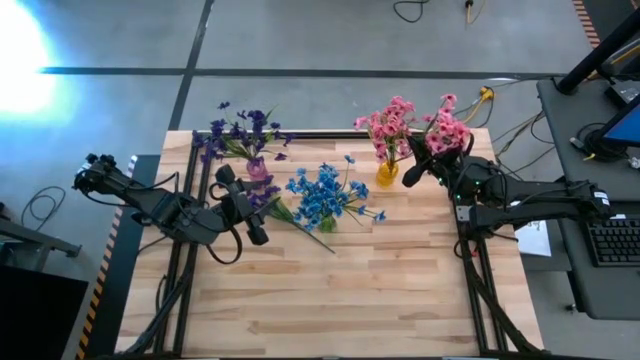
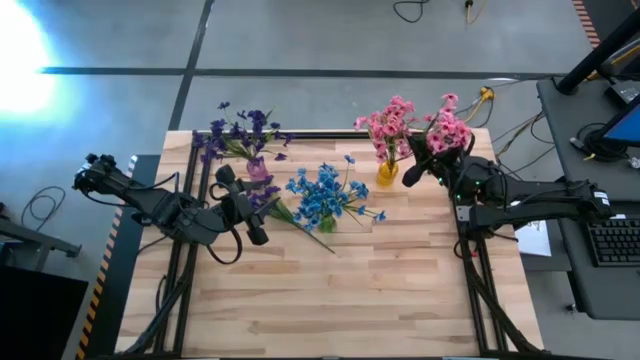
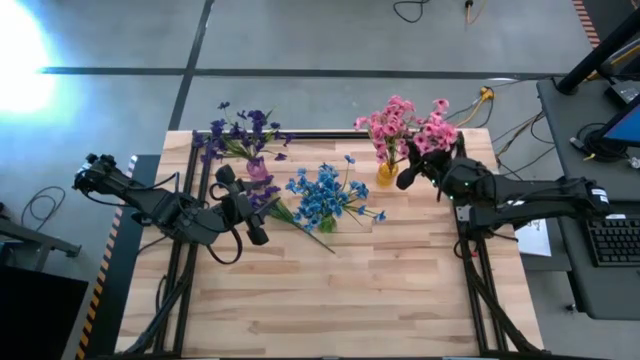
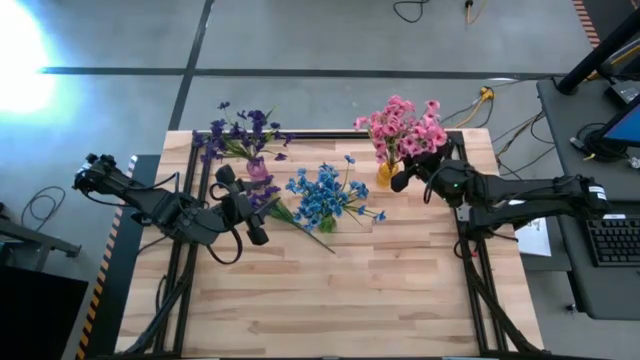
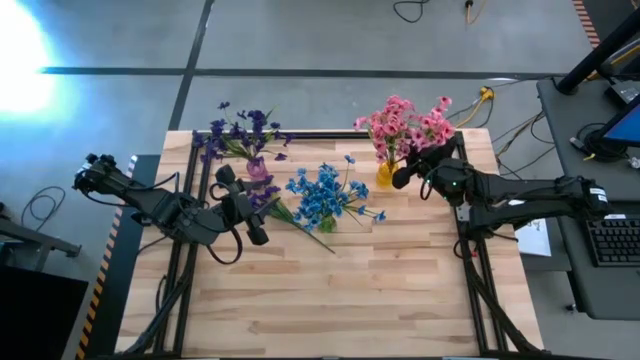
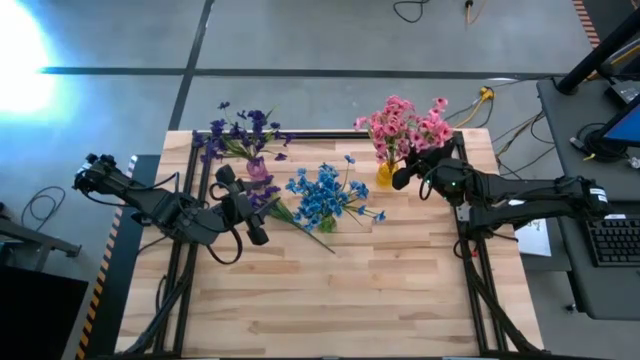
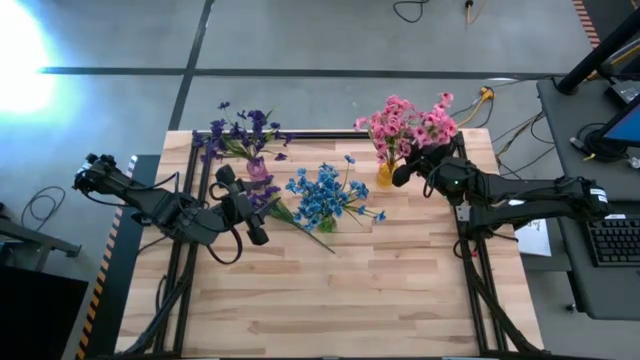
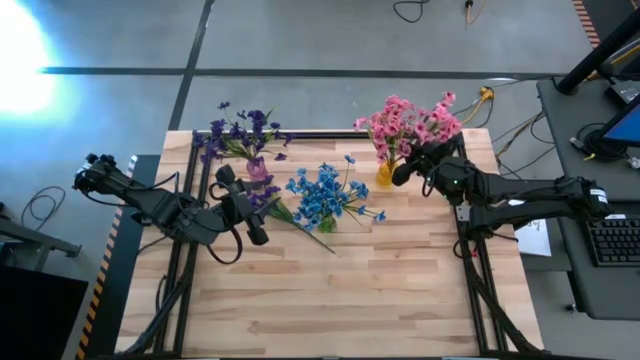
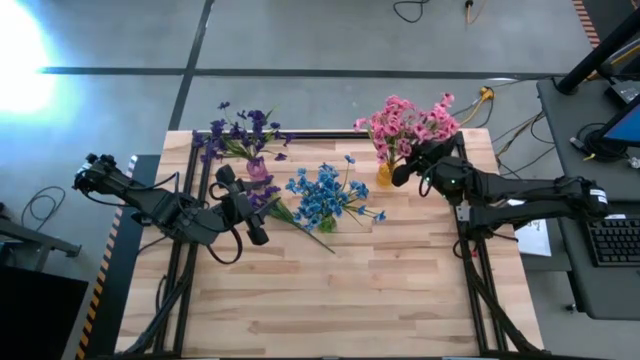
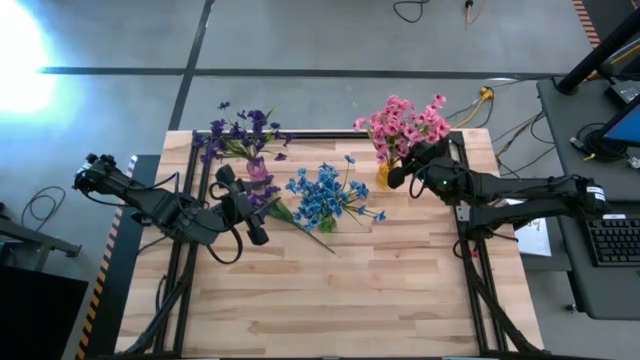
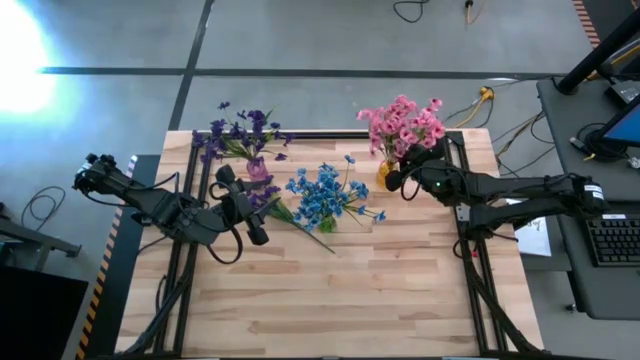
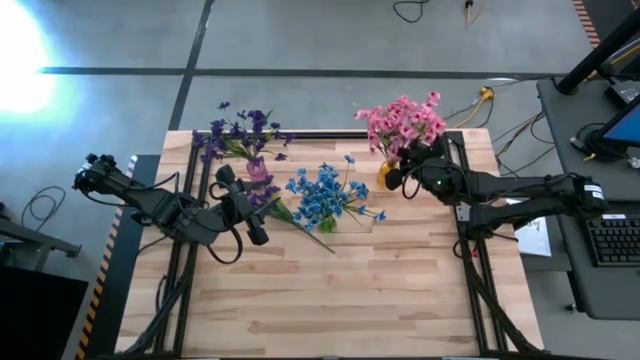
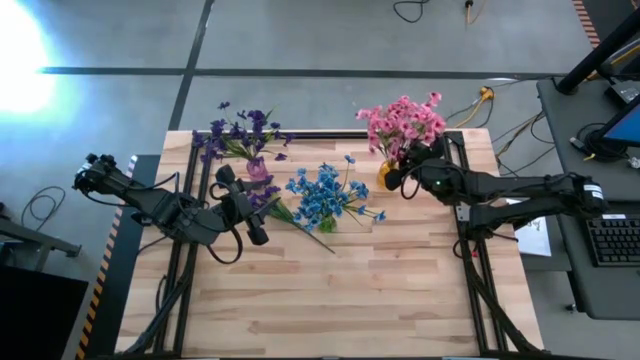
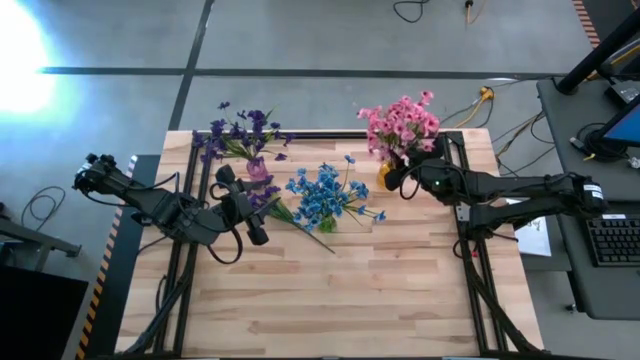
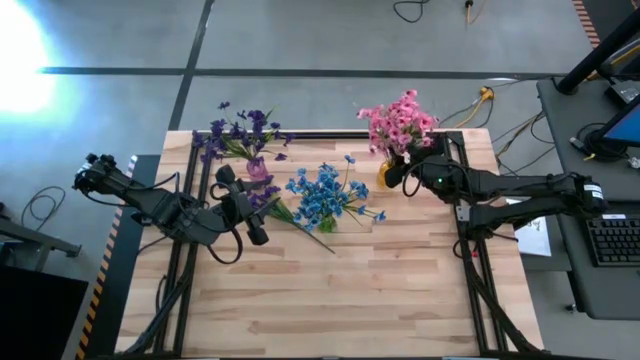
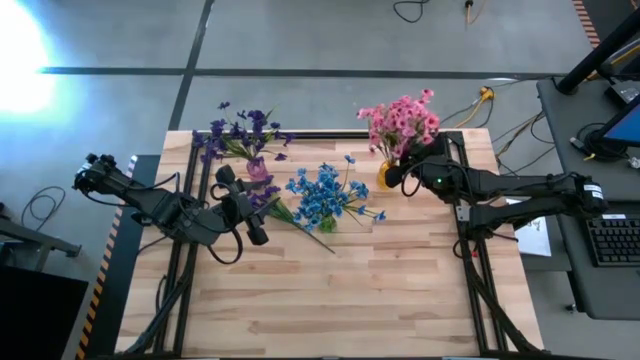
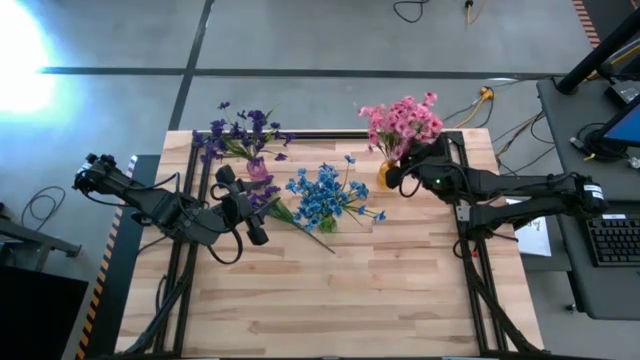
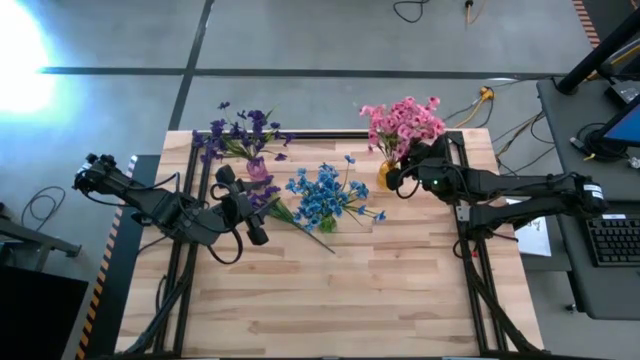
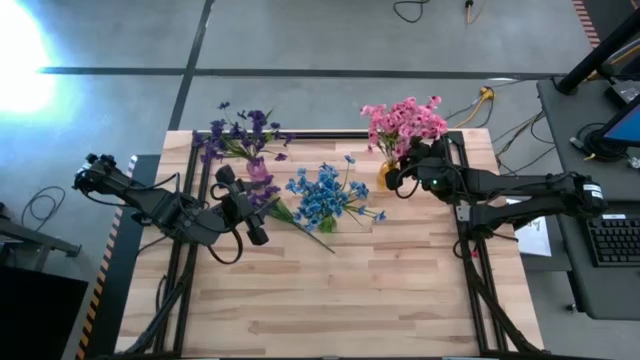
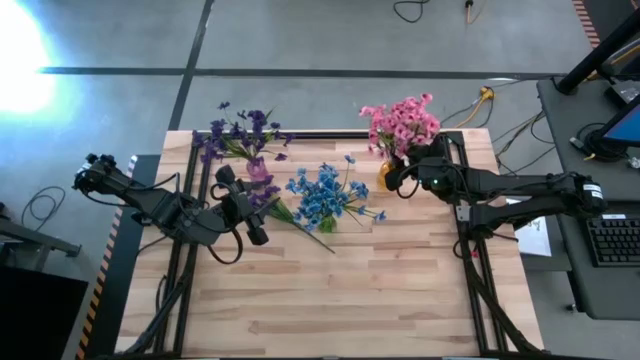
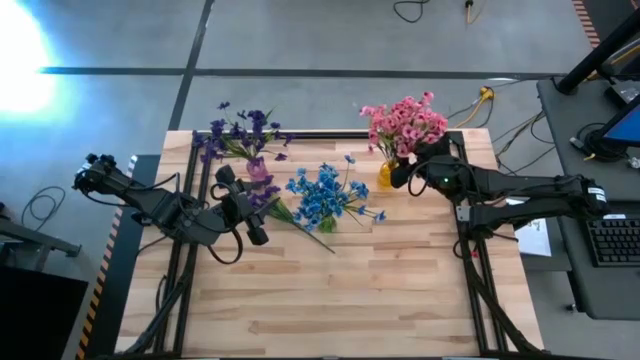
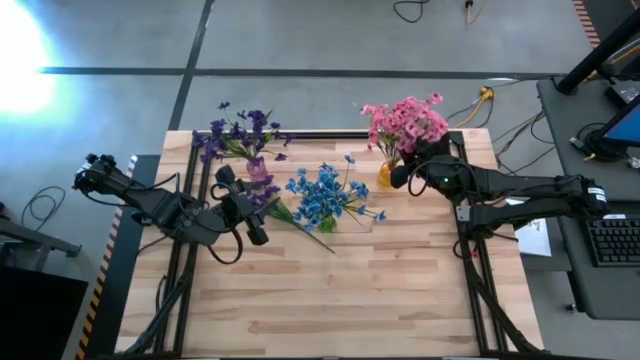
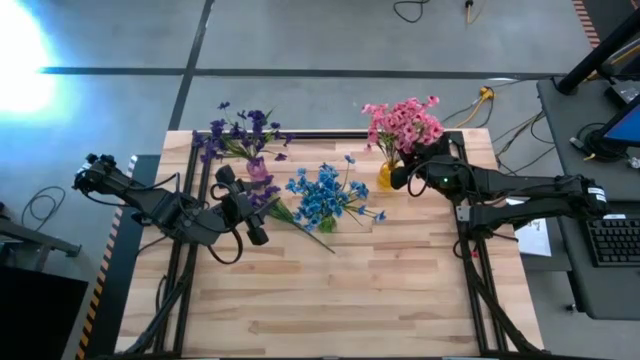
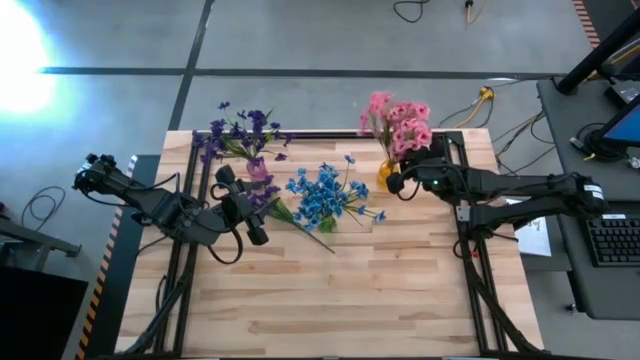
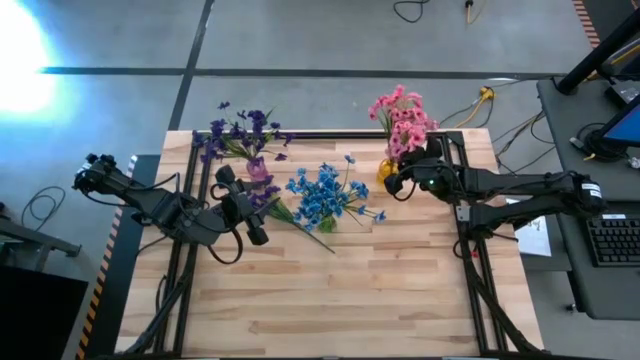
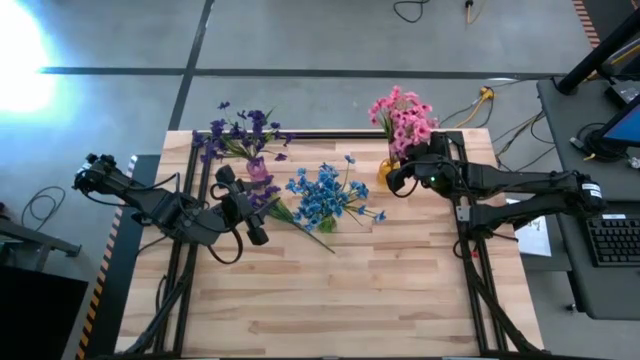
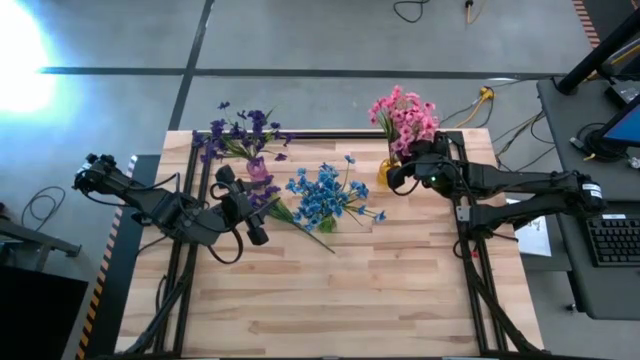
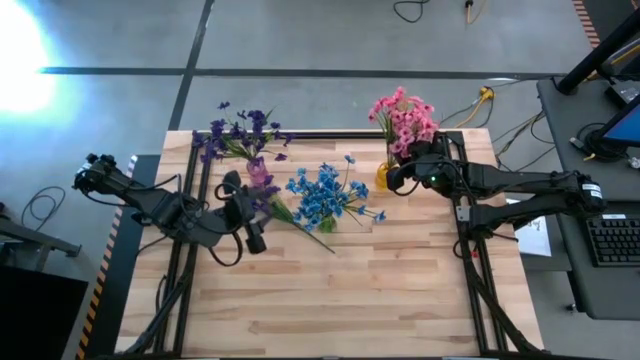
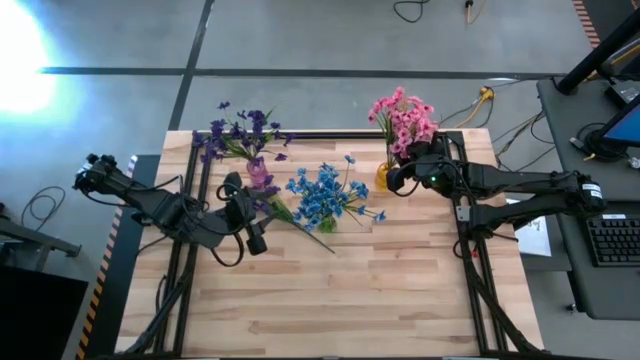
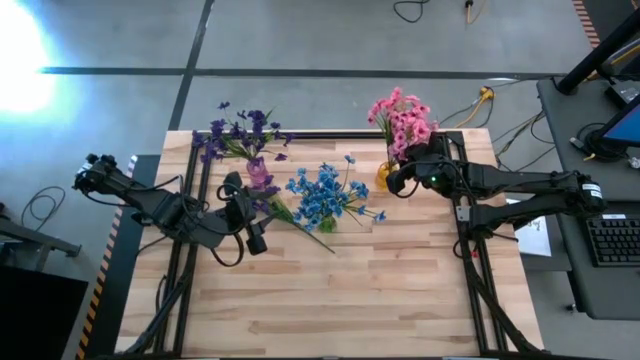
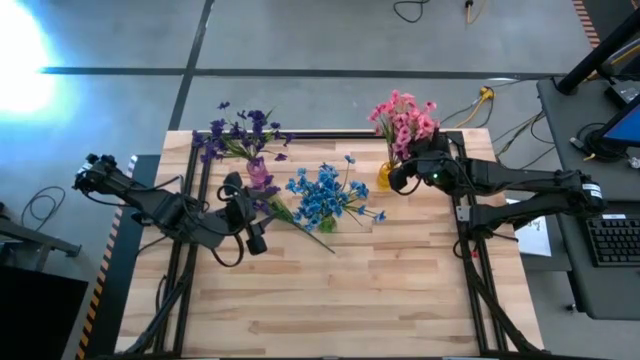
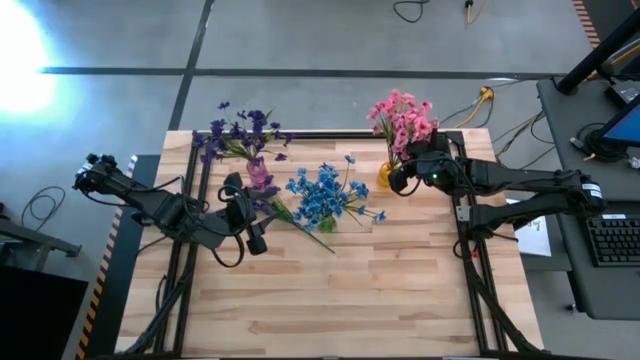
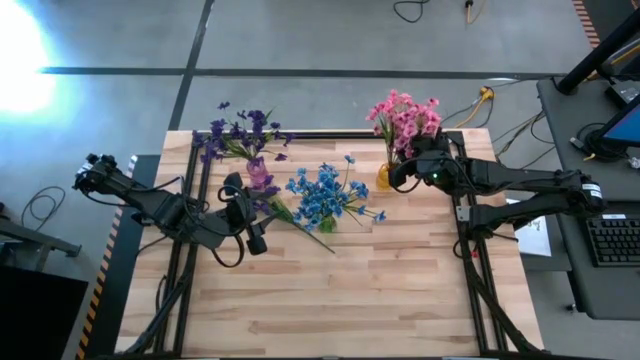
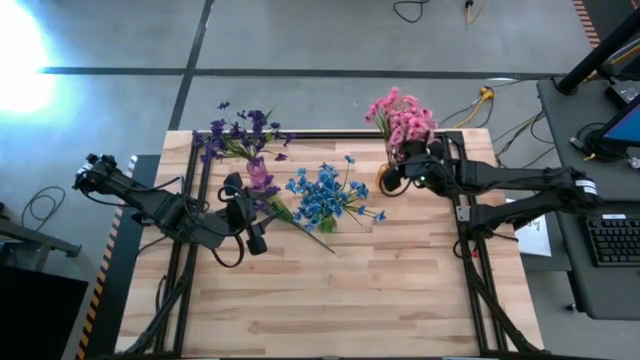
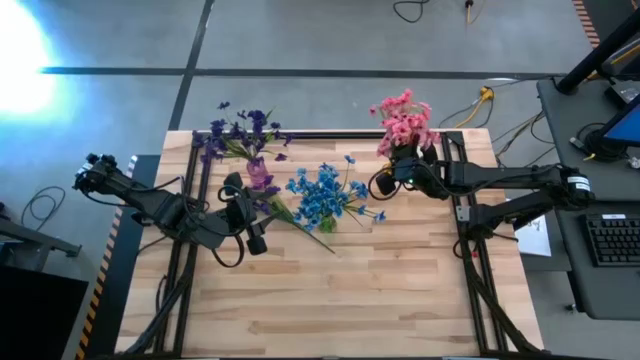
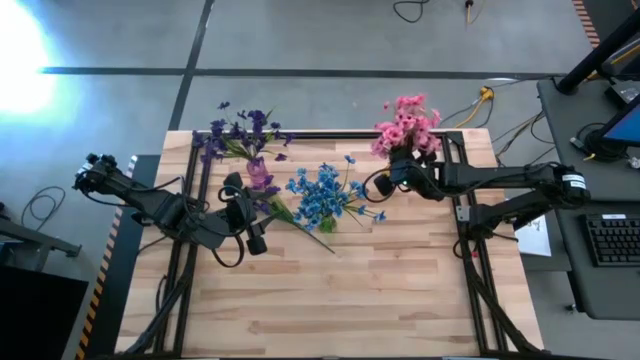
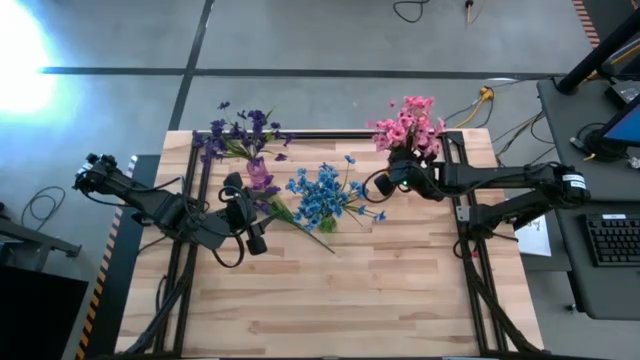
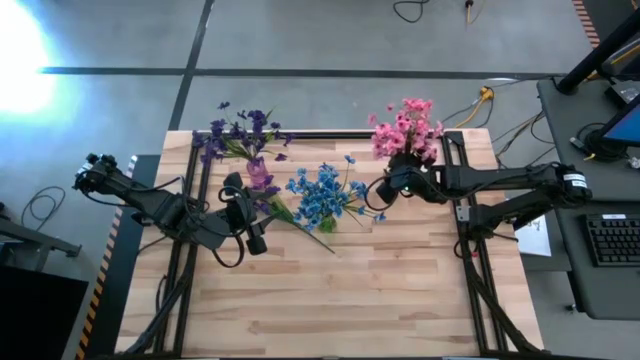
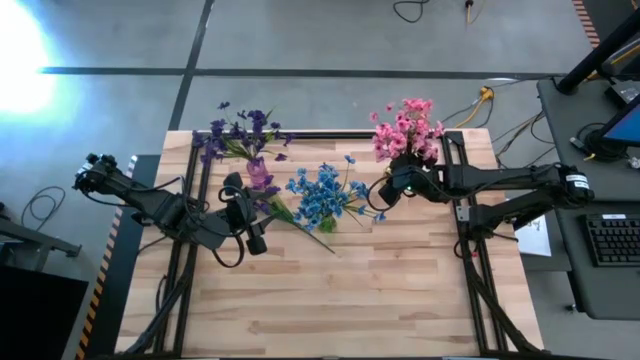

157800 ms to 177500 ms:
Task: Sort flowers into vase by color
Put the pink flowers into the yellow vase
